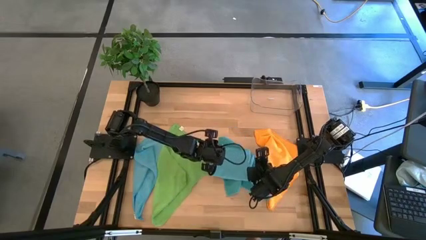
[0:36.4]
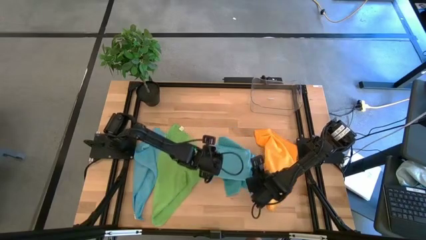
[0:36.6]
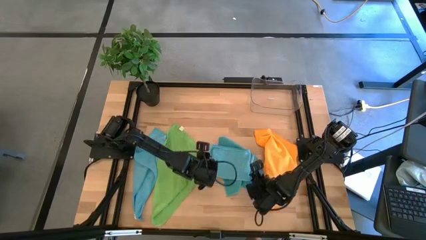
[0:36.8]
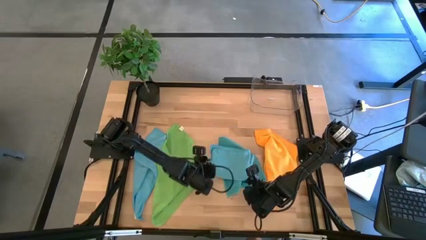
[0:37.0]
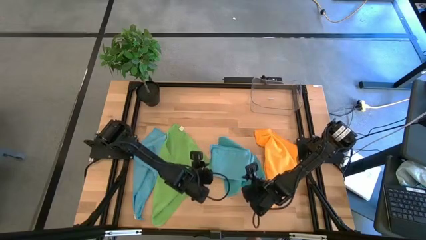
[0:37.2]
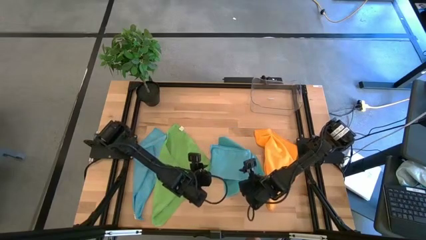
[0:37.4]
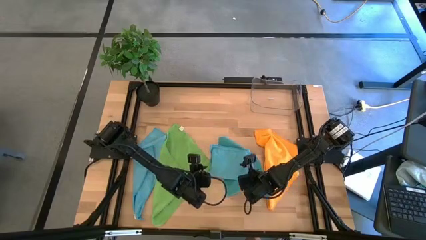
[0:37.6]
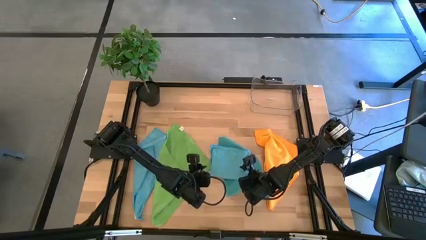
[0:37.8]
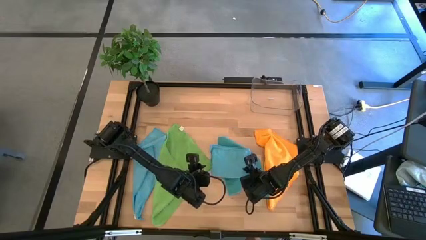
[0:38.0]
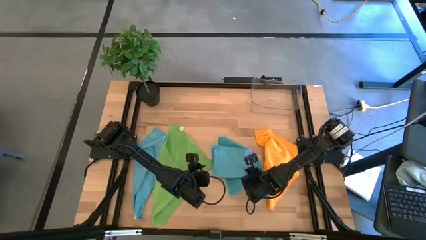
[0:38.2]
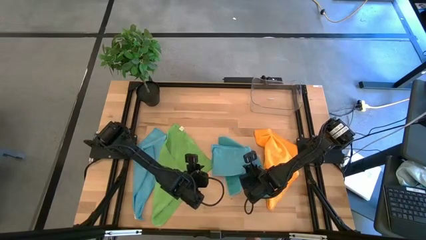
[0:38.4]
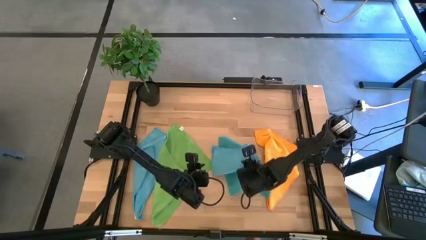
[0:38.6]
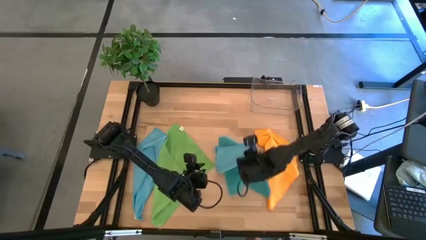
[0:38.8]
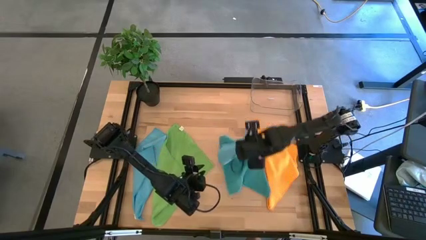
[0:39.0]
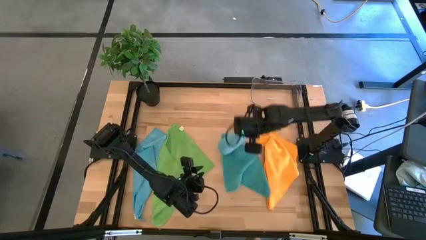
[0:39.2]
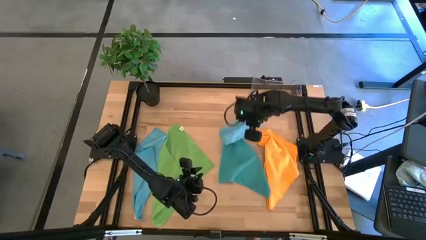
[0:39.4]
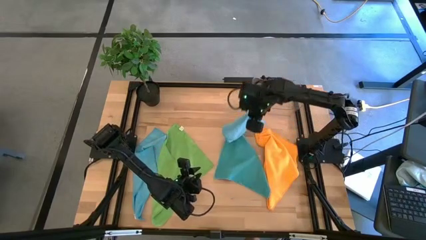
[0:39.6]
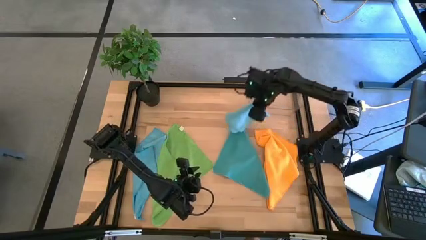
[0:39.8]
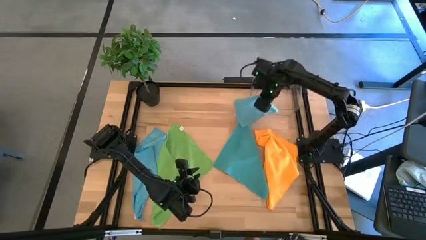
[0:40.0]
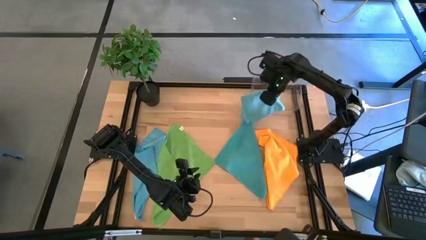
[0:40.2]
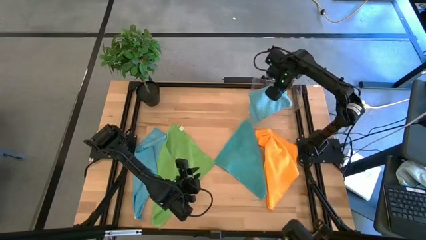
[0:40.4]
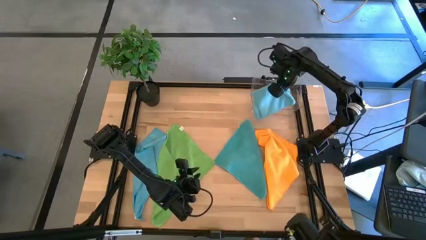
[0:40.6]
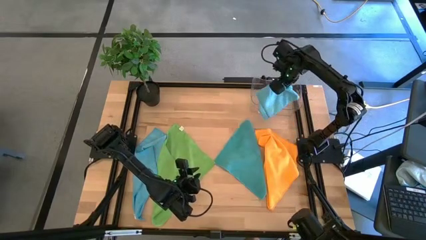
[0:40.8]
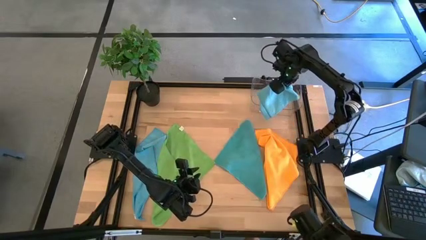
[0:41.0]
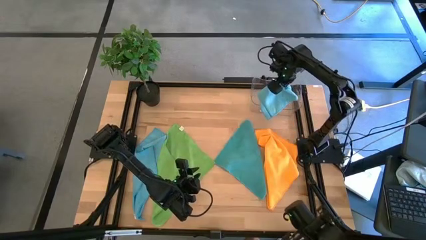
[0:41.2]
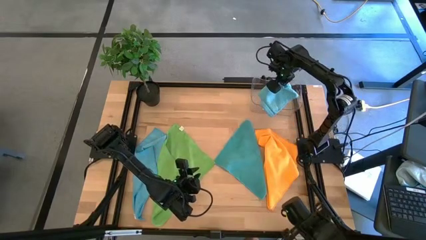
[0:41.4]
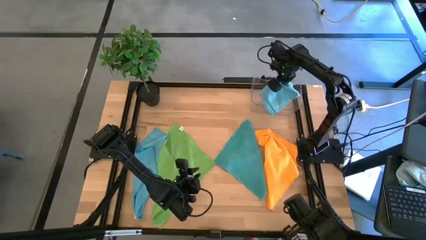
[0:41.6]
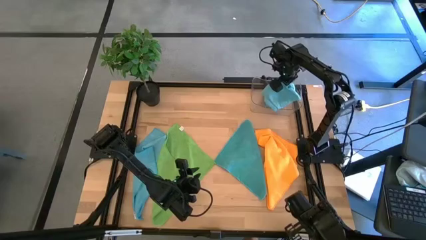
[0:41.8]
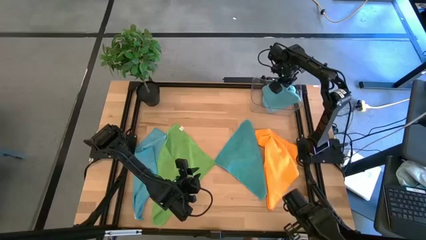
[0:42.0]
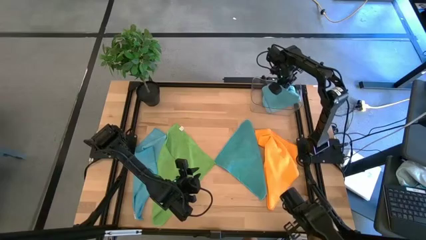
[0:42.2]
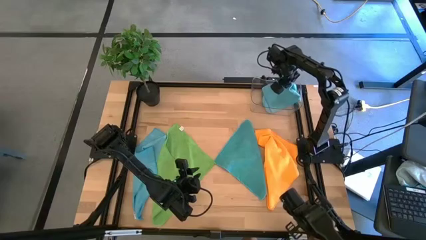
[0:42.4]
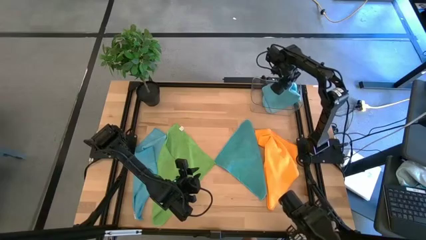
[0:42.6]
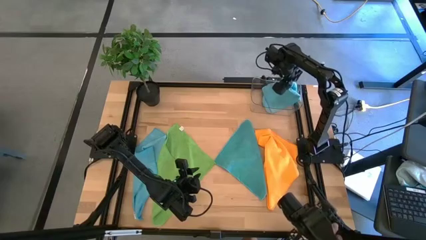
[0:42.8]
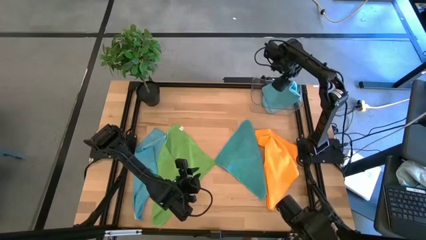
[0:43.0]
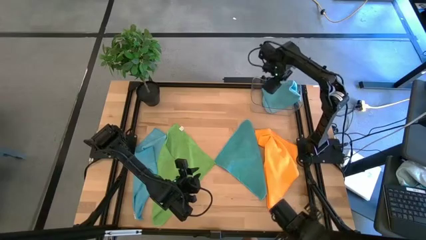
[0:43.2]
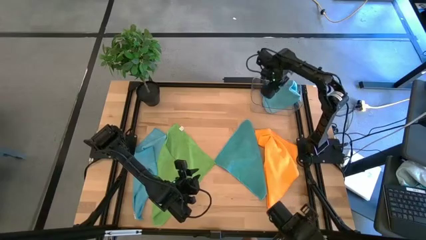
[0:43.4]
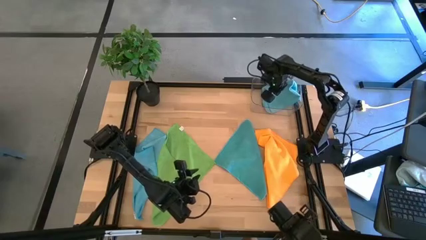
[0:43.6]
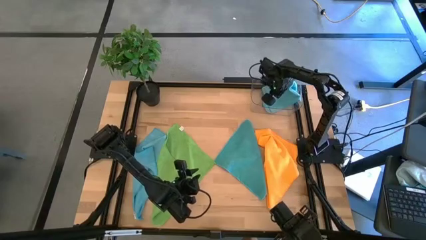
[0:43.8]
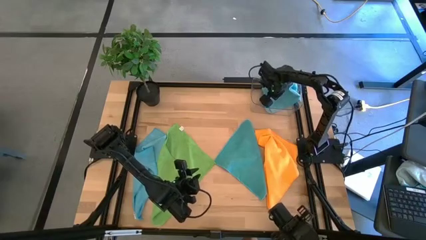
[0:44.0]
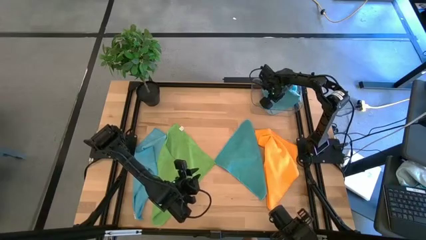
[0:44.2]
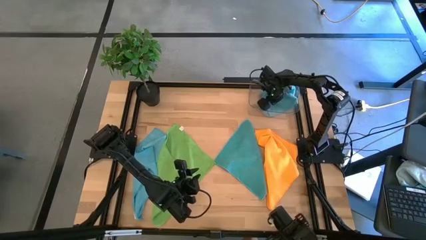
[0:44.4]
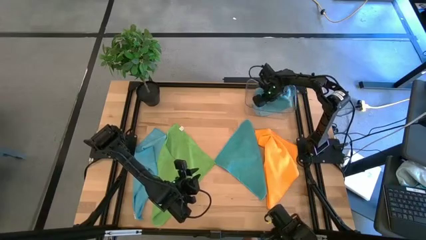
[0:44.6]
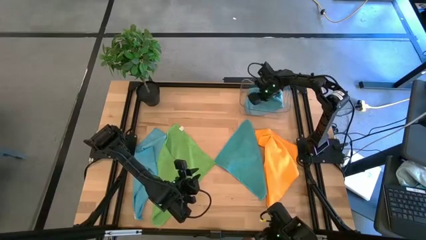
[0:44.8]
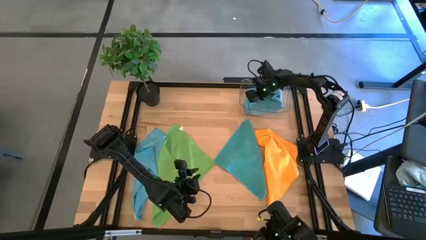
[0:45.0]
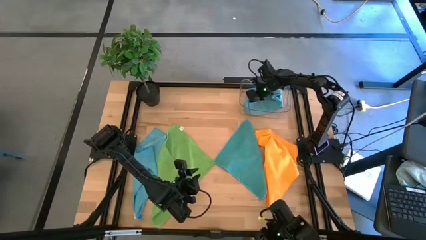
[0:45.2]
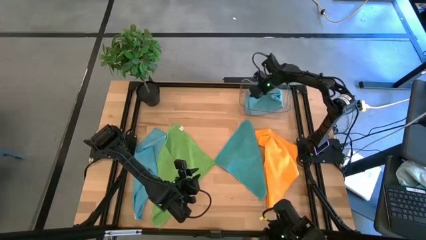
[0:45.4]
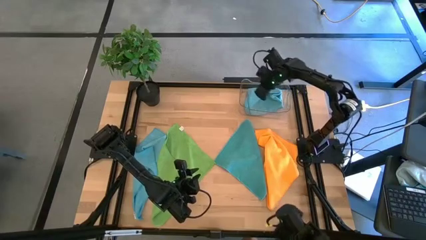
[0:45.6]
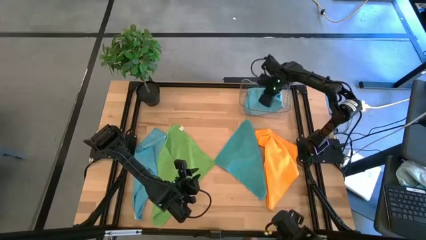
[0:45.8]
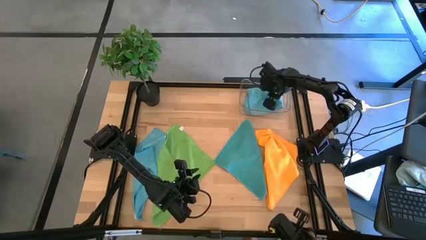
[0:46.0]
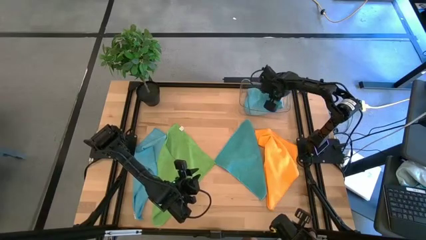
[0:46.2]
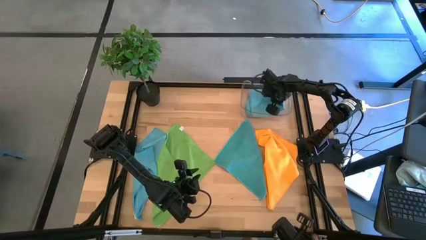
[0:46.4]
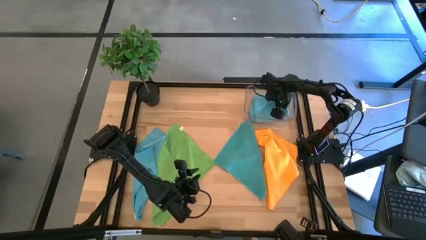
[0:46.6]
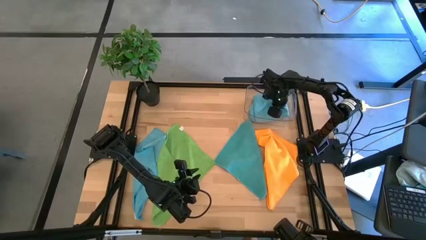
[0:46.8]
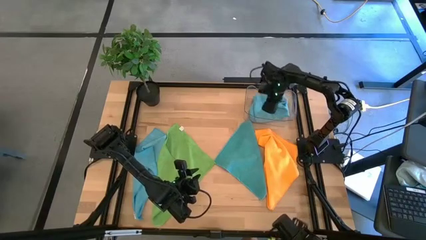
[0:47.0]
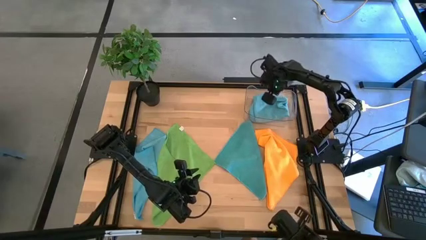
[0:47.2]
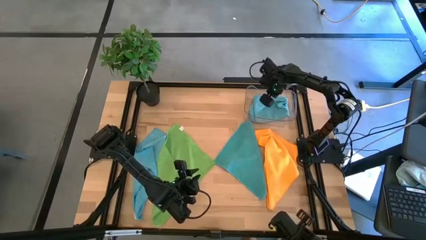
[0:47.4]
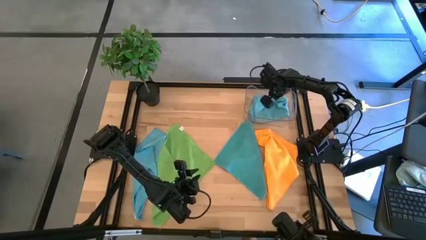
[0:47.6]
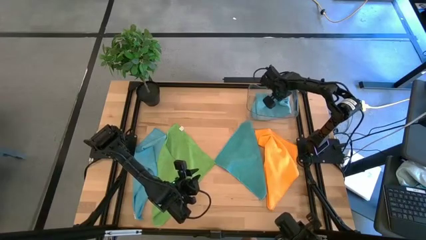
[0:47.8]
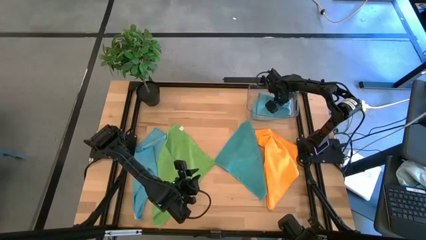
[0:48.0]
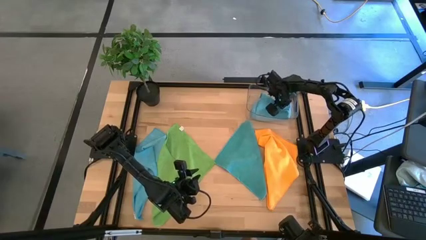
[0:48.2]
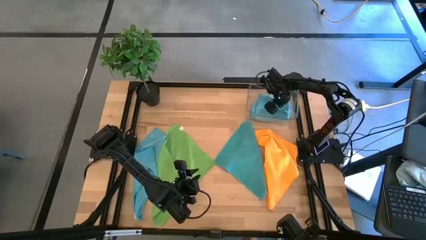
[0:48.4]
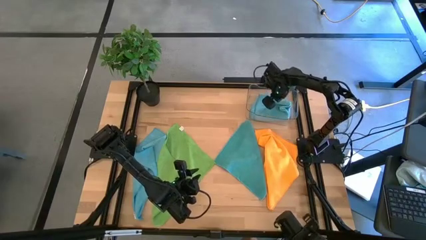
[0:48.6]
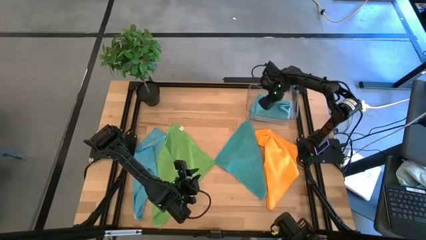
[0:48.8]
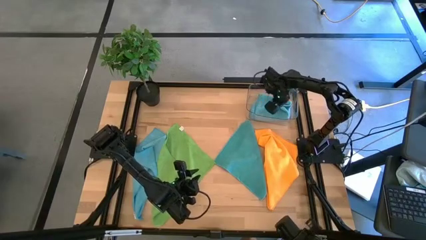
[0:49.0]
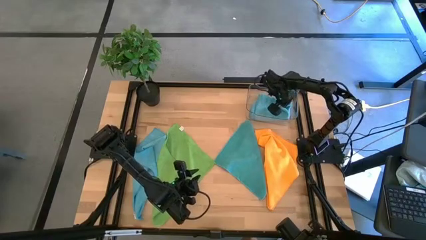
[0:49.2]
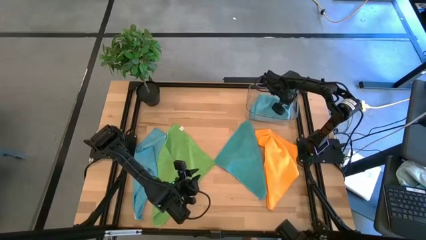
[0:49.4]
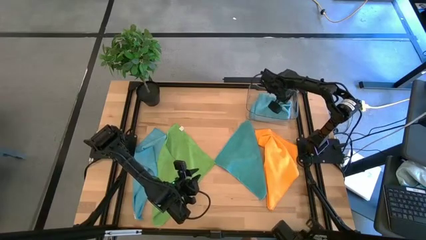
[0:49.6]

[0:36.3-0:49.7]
Task: Fold microfiber towels
Put the right folded light blue microfiber towel into the transparent bin

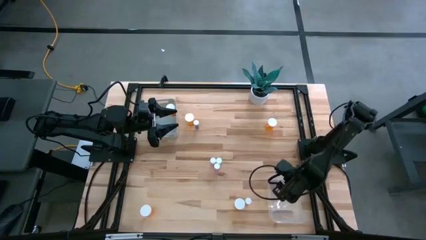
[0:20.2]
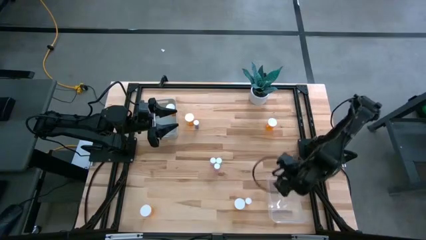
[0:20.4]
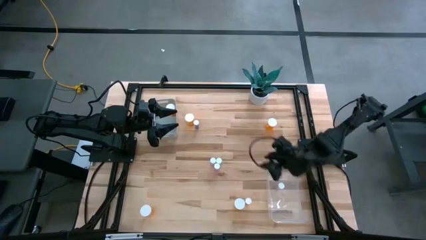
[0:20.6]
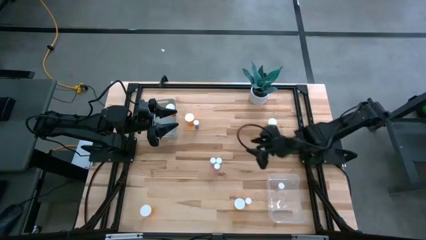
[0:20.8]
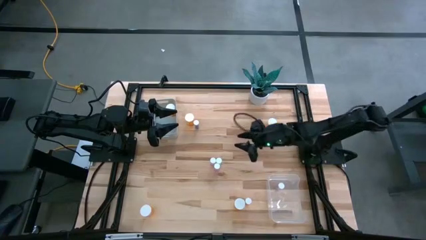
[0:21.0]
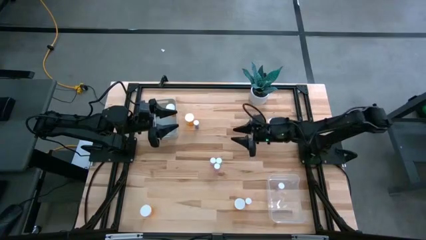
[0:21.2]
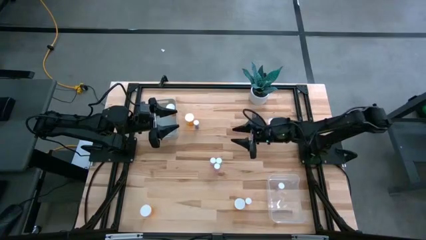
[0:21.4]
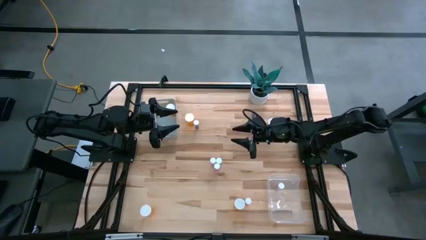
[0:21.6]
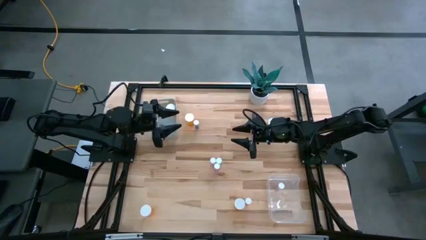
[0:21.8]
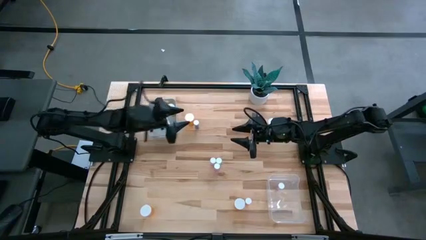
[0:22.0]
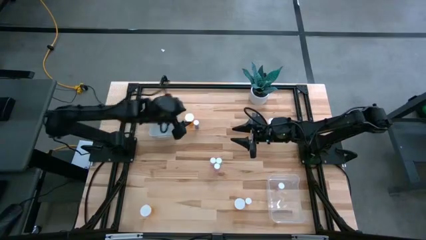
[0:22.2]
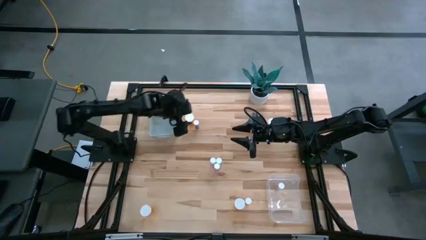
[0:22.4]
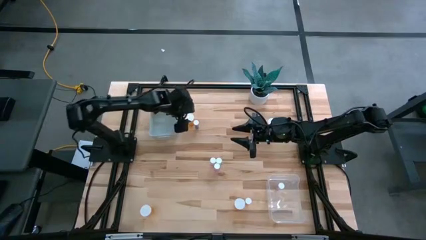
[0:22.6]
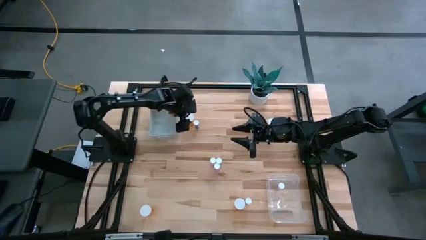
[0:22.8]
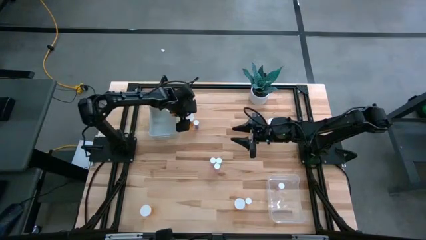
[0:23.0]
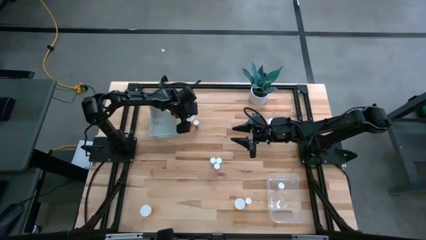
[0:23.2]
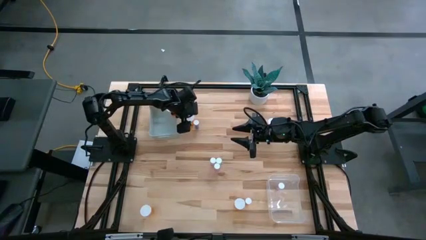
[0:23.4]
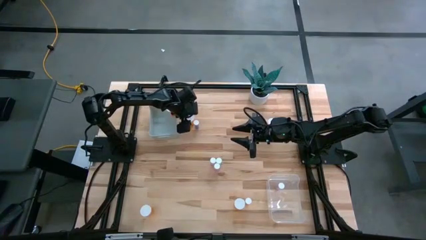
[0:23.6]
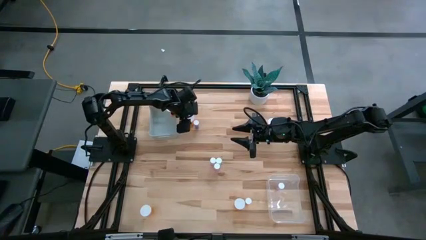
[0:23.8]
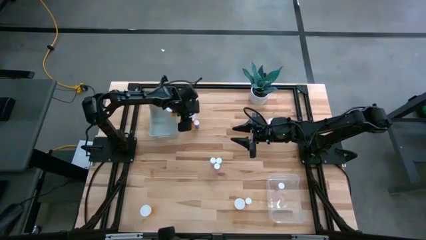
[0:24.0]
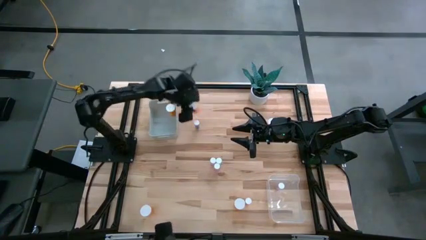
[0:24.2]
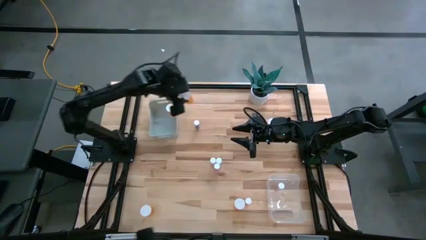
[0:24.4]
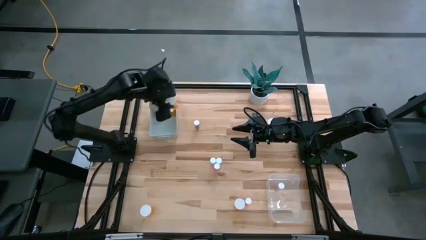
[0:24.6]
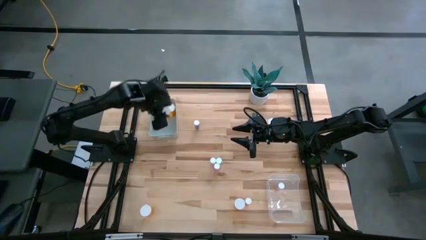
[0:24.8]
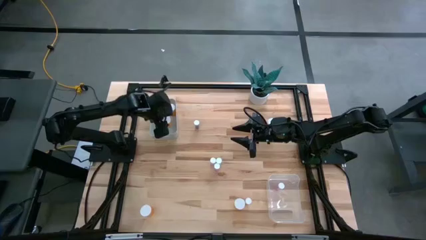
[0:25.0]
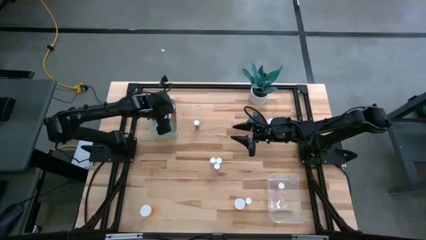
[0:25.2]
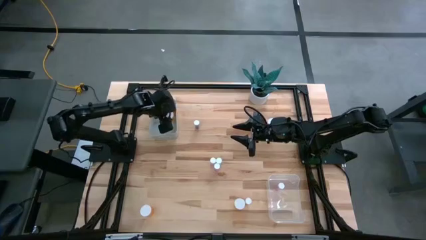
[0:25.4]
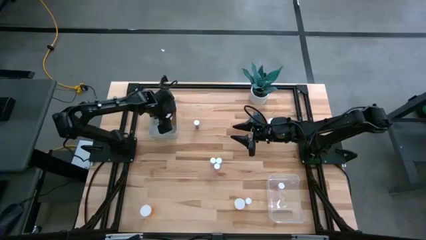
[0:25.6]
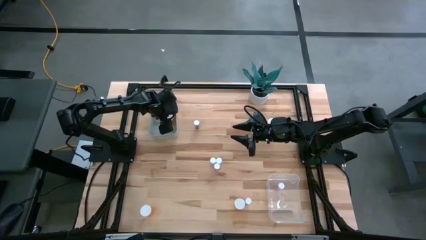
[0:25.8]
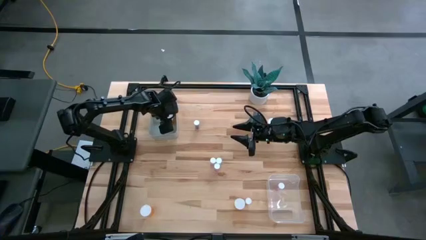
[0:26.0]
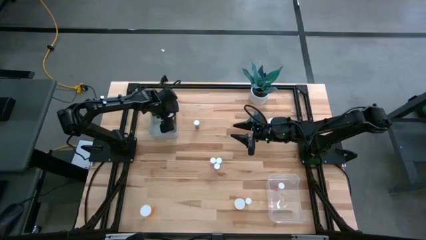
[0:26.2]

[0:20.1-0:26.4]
Task: Pick and place medicine bottles into bin by pill shape (circle, oval)
Put the orange capsule bottle into the gray bin
